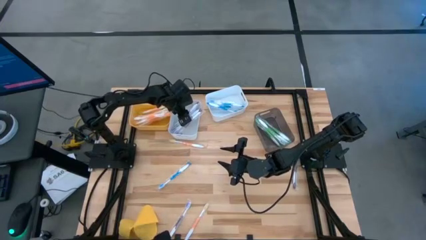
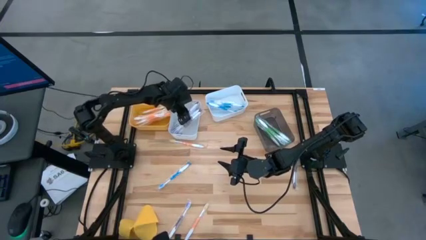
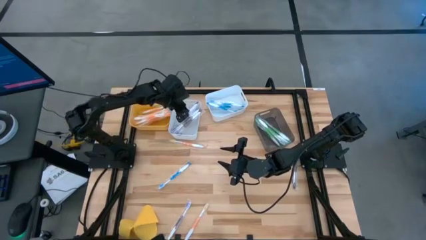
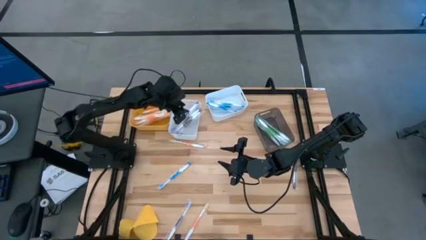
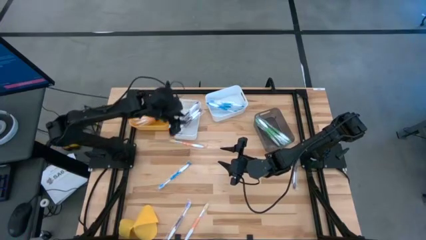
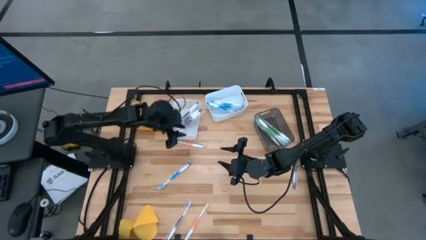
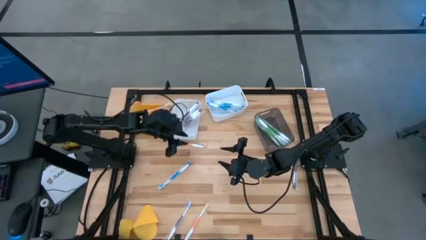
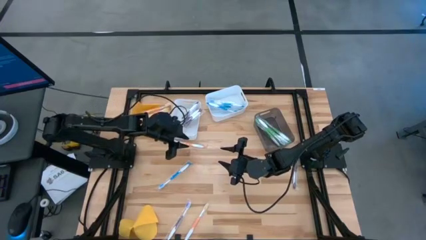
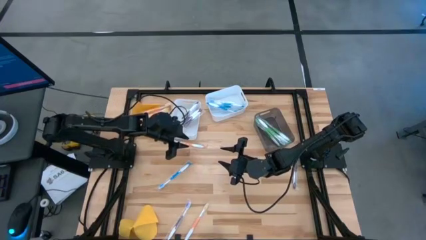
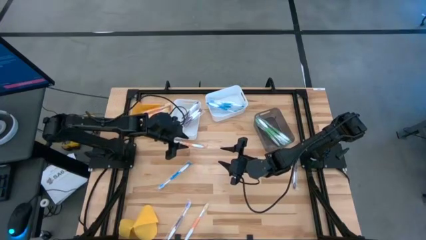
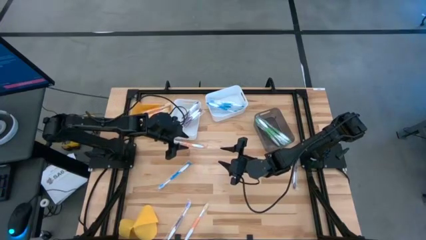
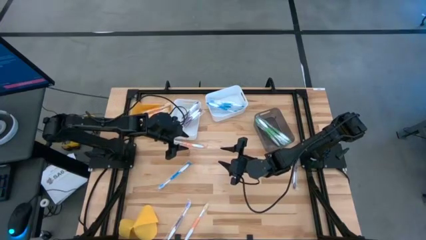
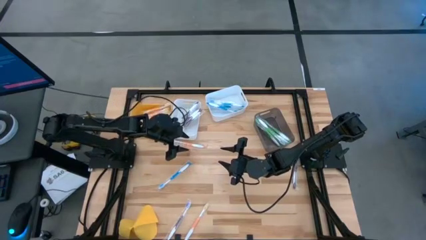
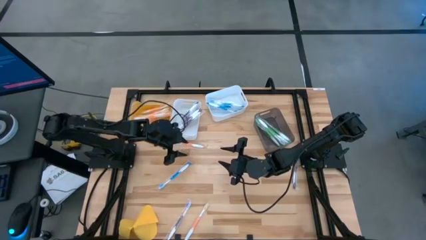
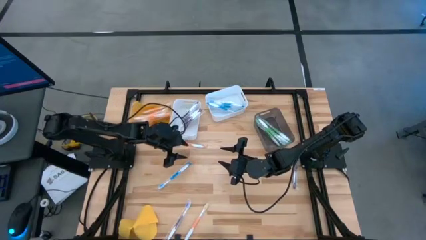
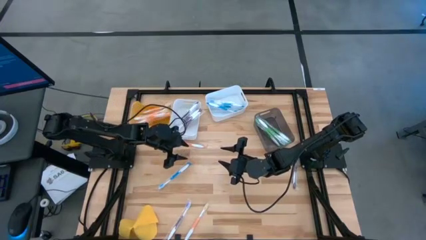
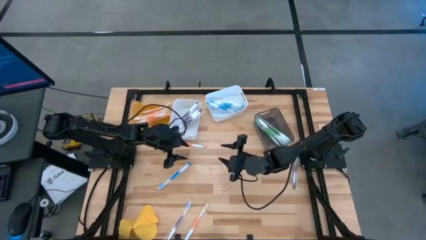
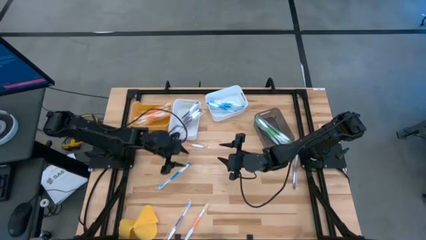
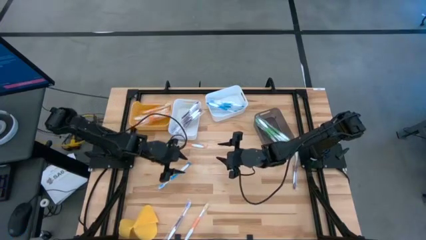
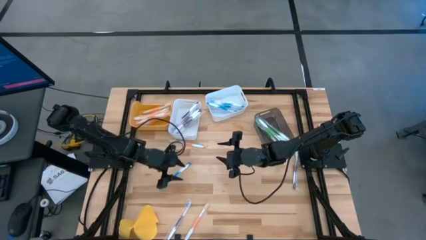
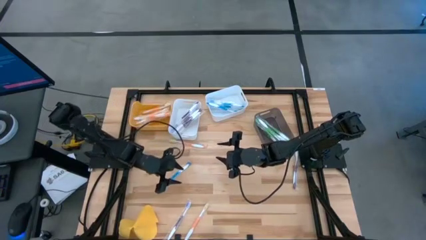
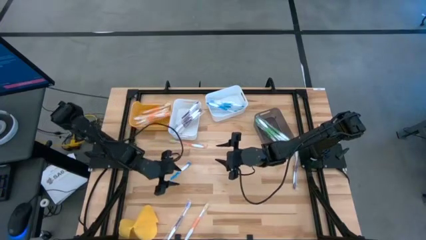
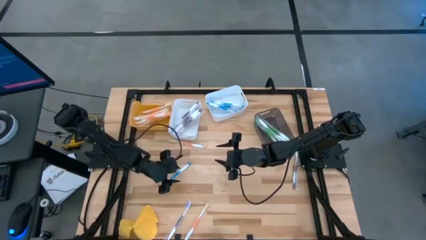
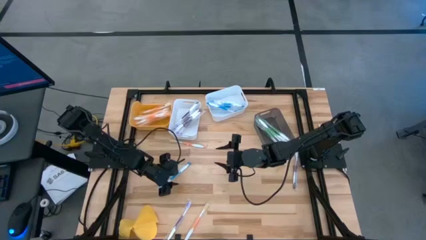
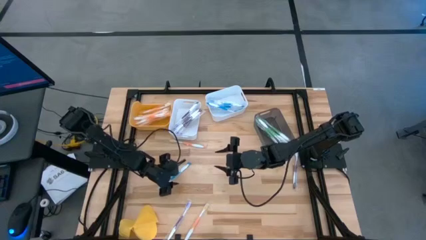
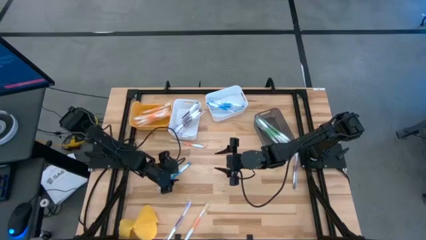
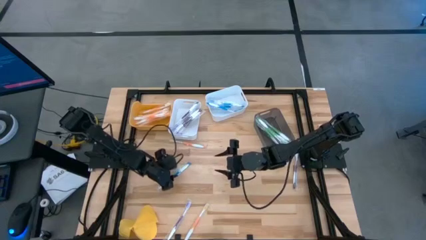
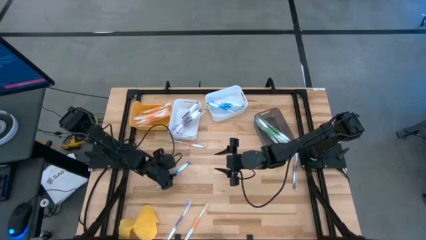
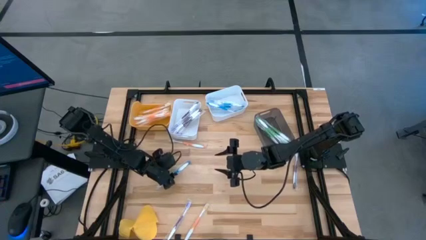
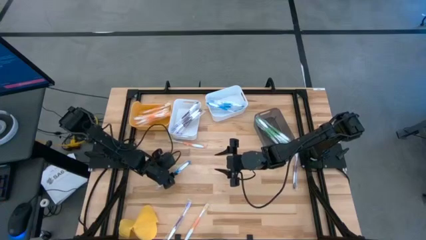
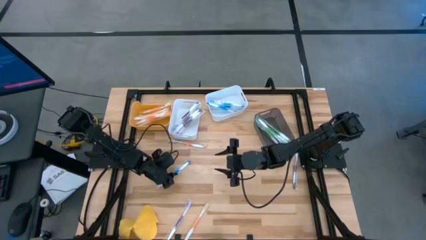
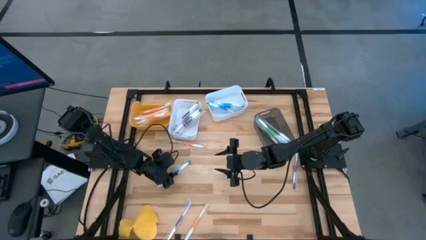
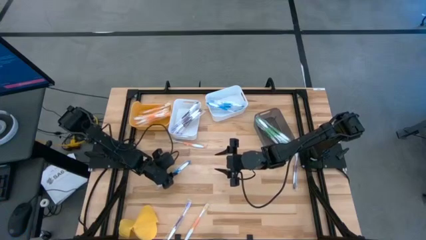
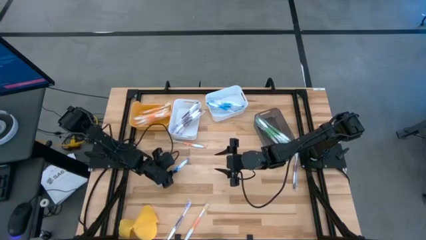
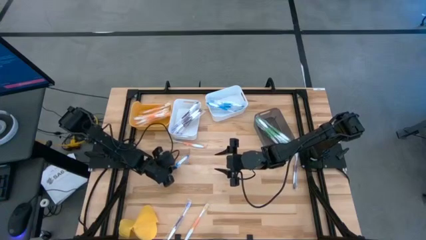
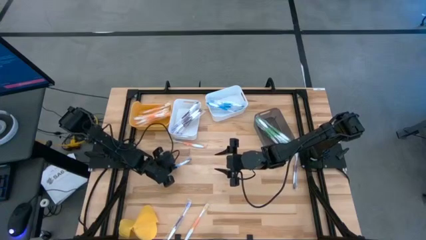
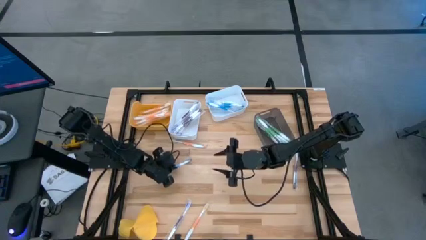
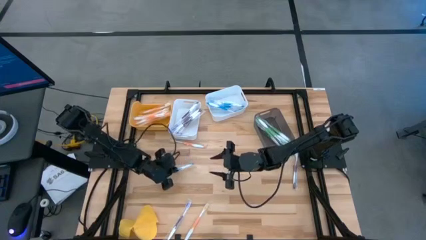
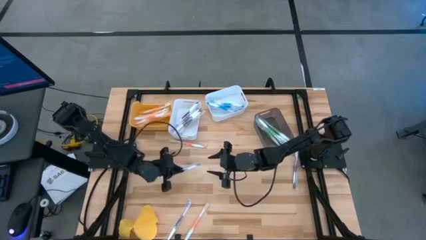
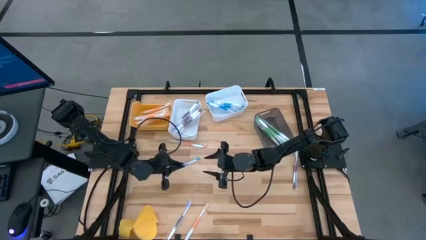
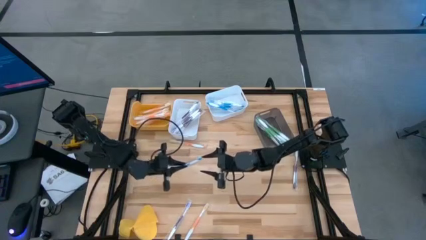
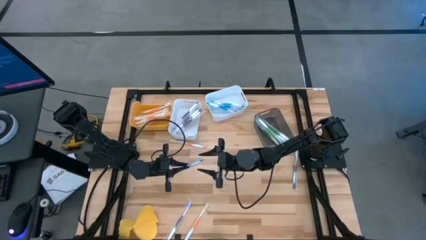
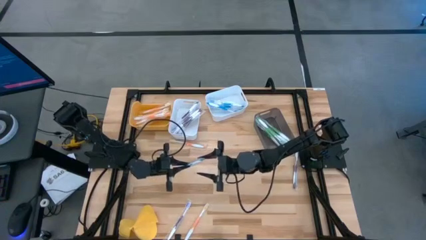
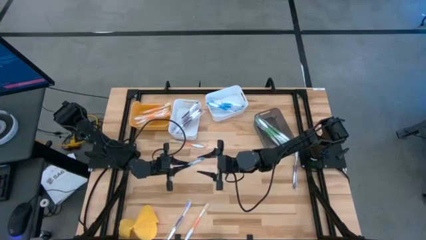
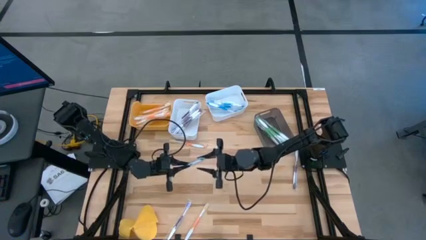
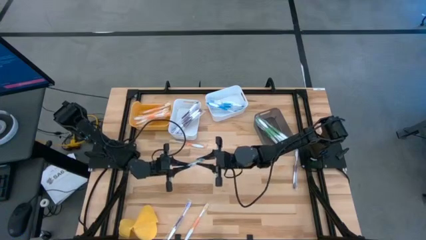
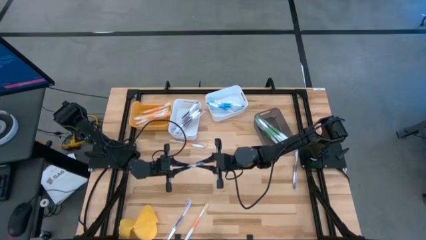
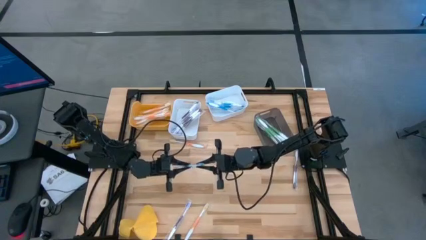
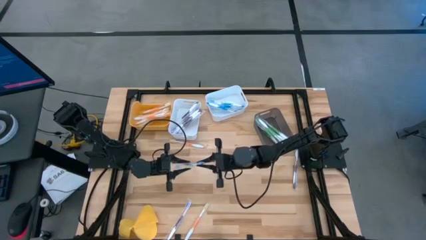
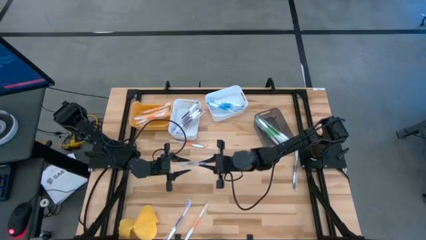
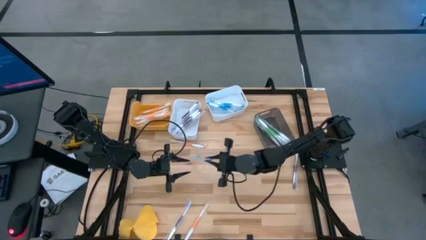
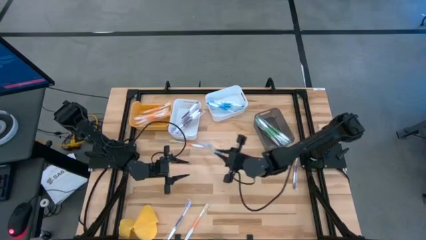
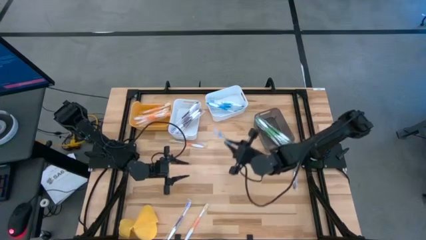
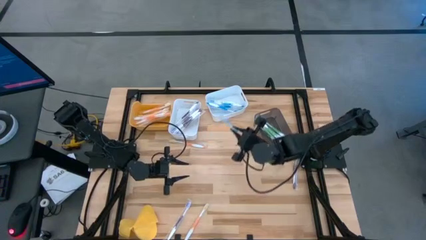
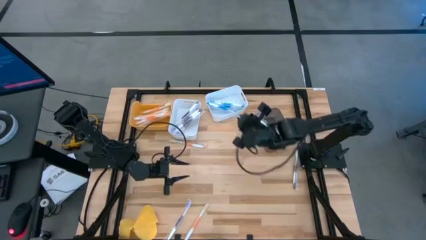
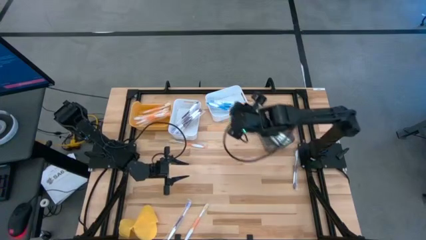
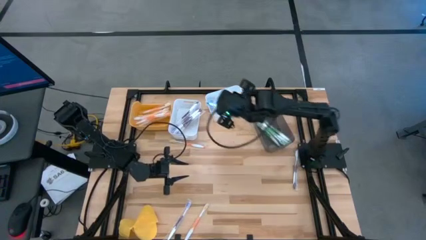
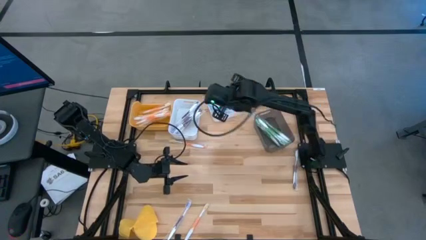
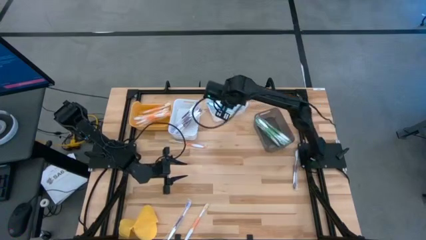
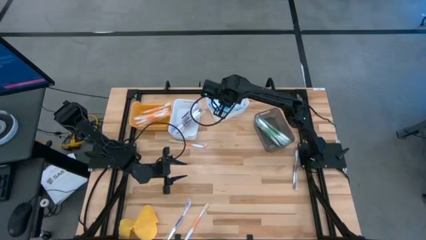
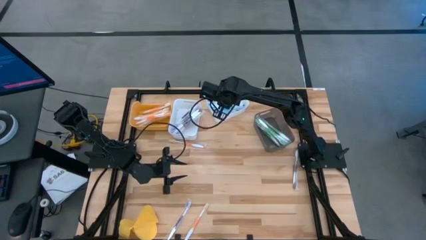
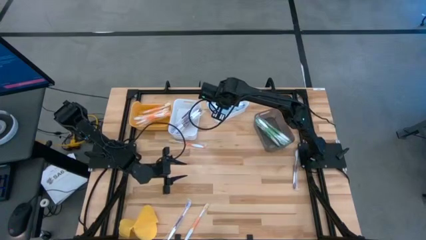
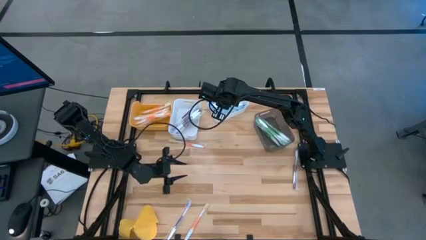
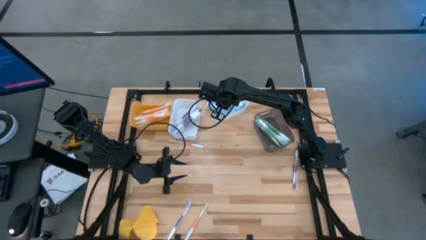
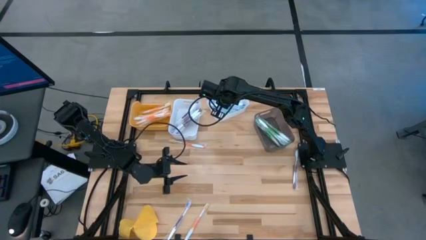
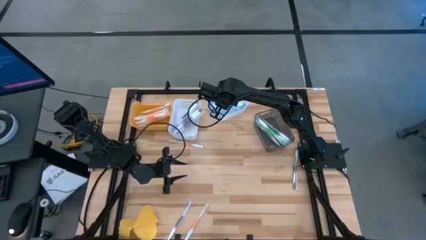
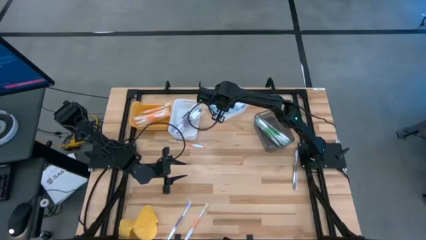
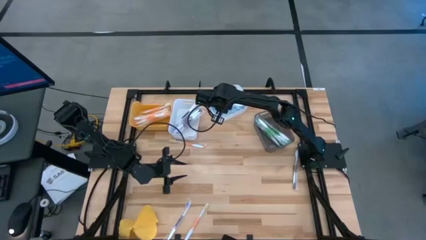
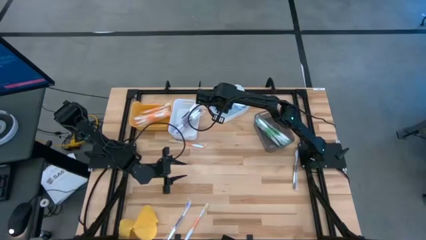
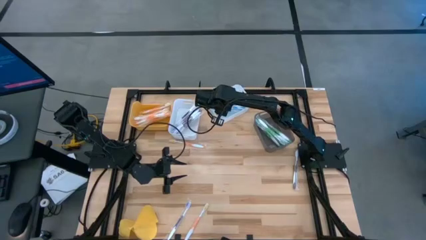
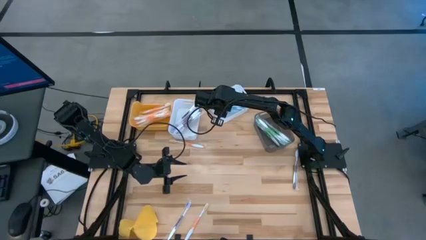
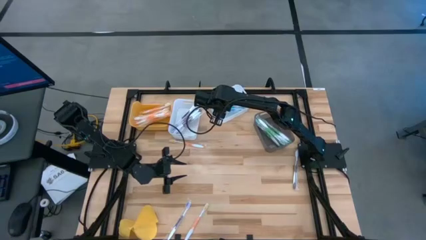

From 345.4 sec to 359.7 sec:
Task: Pick & Place Toothbrushes
Put the blue toothbrush into the right white bin
